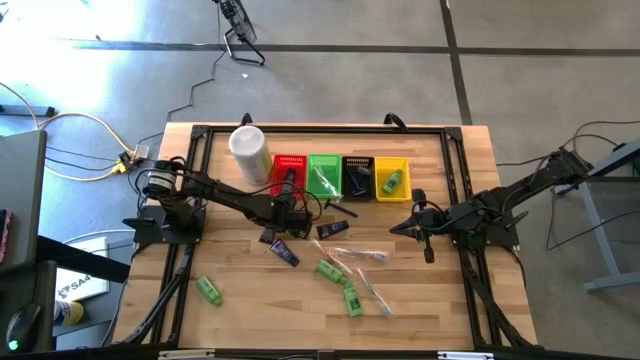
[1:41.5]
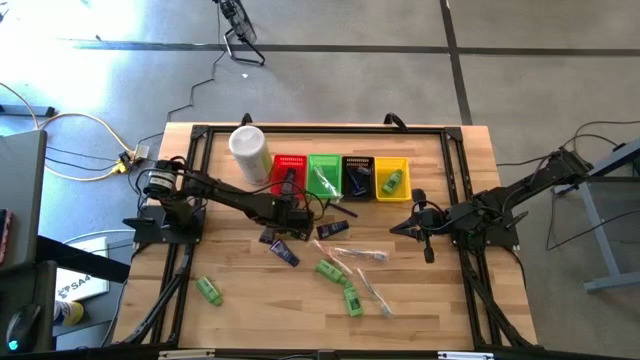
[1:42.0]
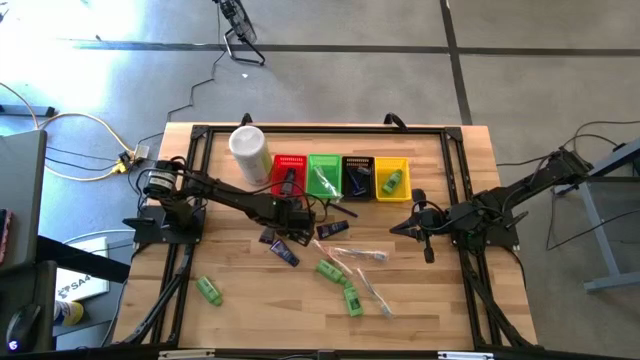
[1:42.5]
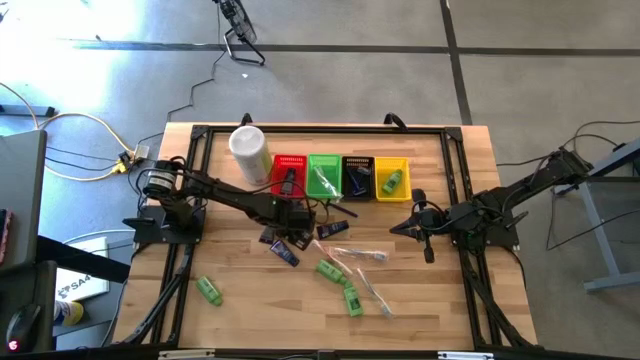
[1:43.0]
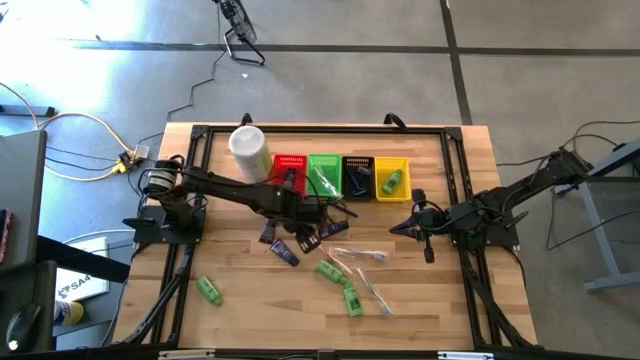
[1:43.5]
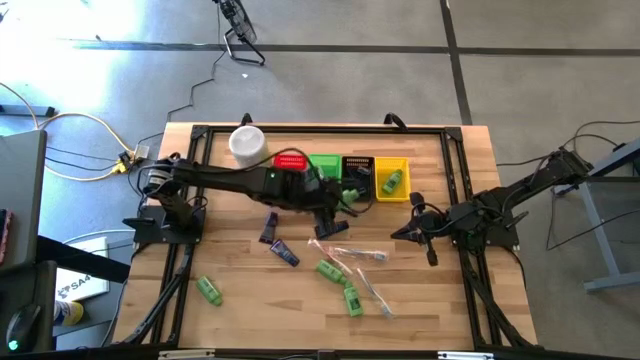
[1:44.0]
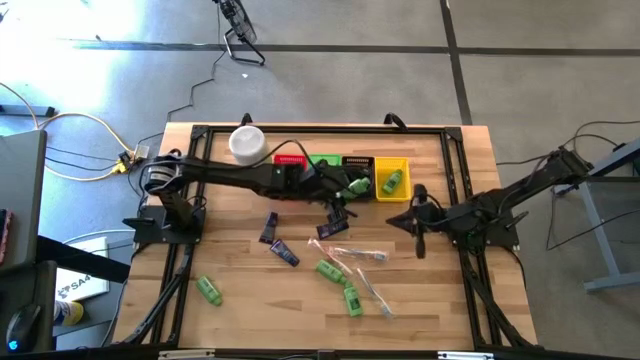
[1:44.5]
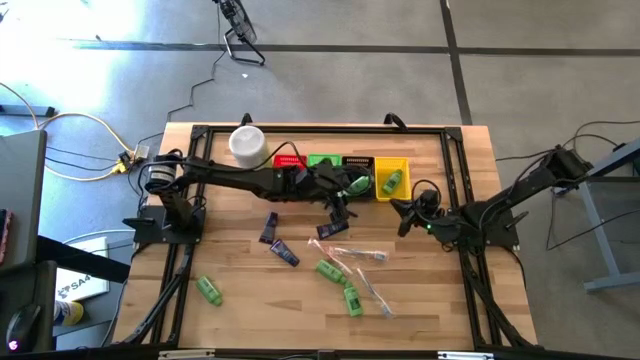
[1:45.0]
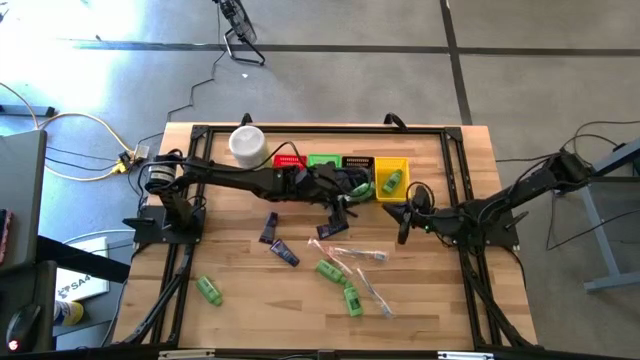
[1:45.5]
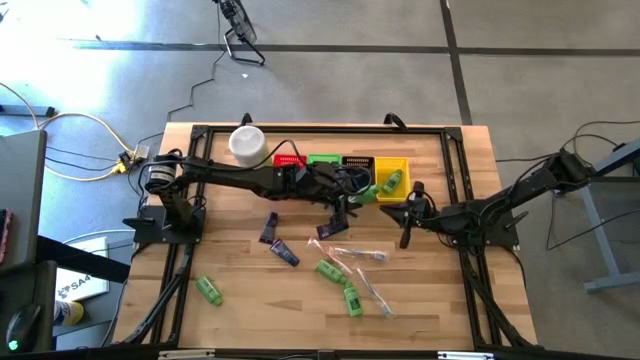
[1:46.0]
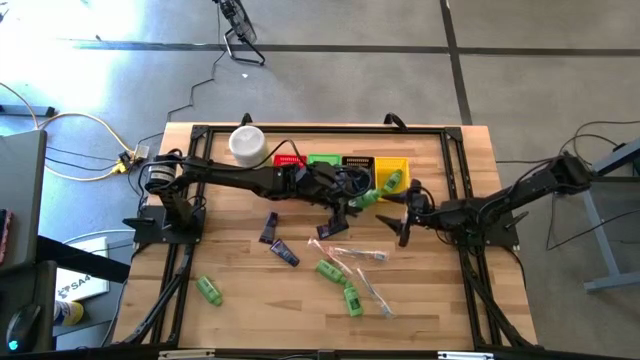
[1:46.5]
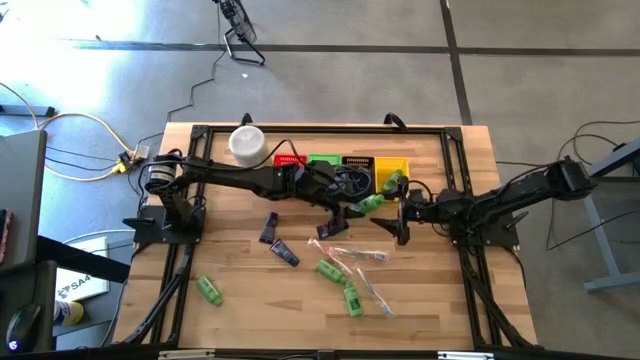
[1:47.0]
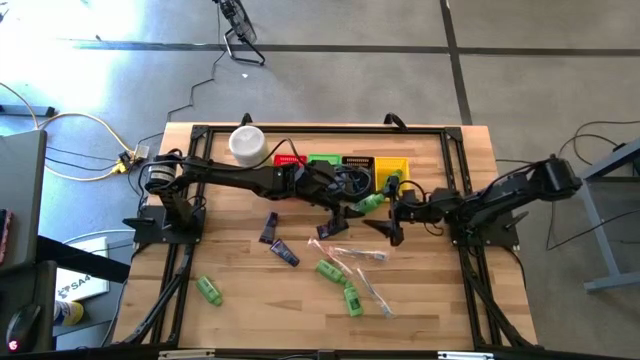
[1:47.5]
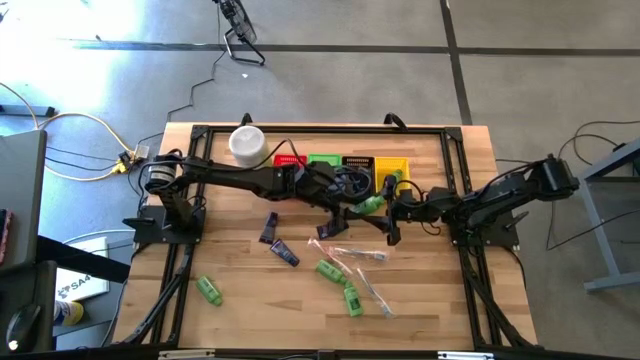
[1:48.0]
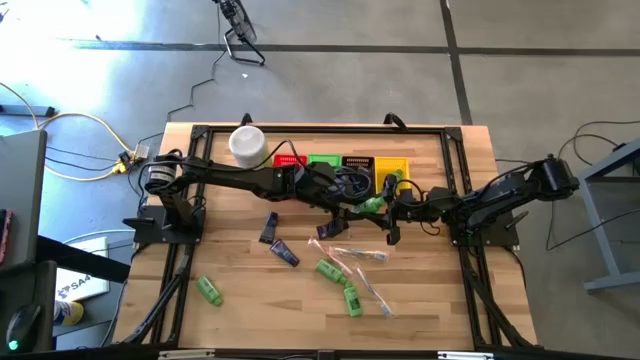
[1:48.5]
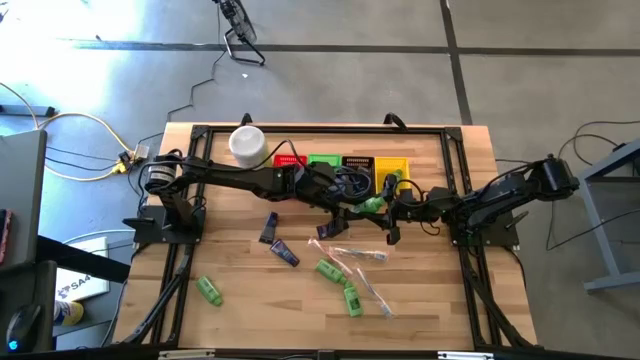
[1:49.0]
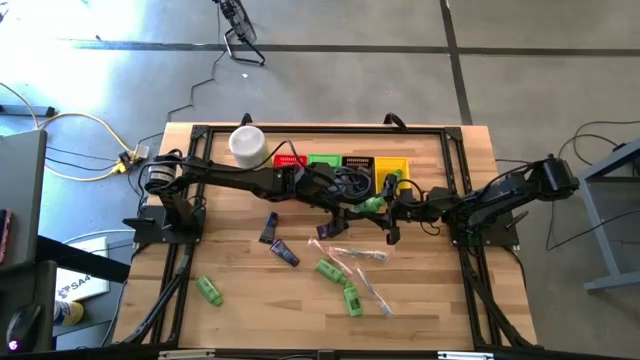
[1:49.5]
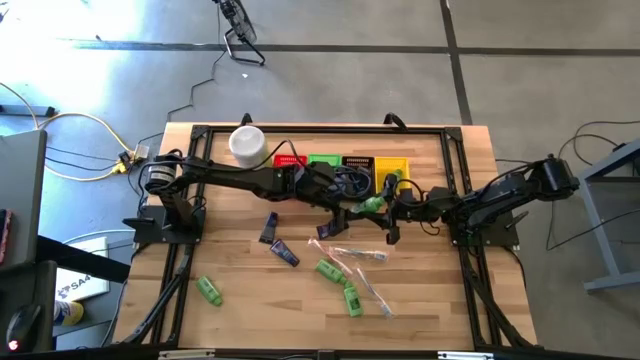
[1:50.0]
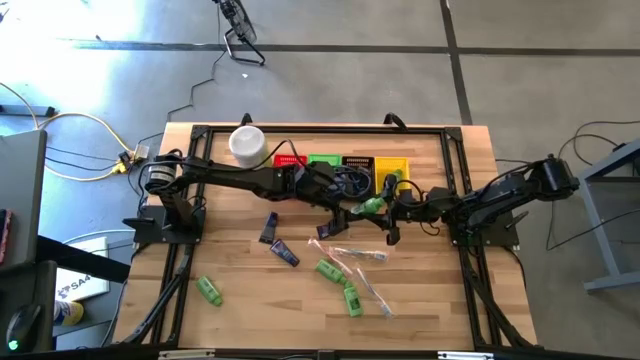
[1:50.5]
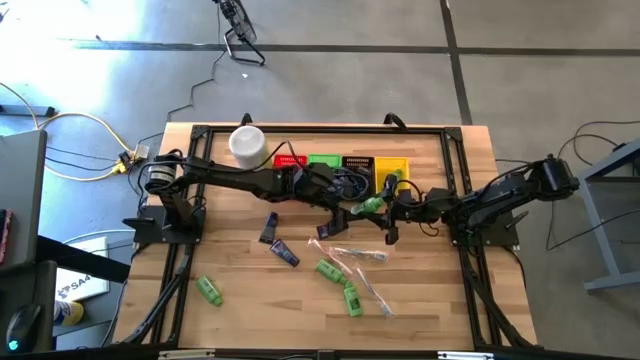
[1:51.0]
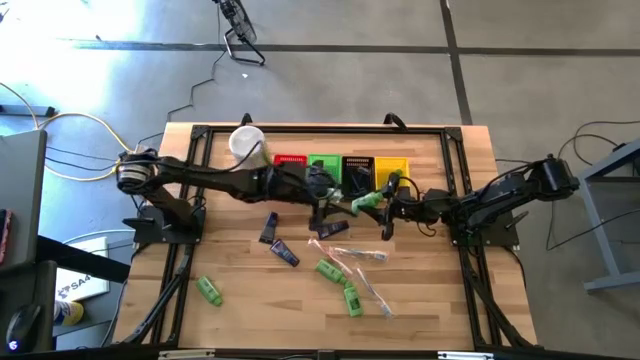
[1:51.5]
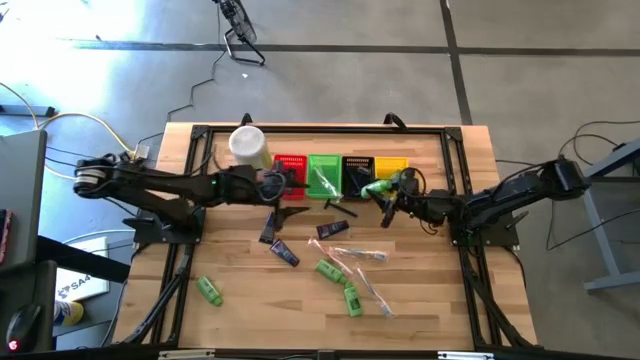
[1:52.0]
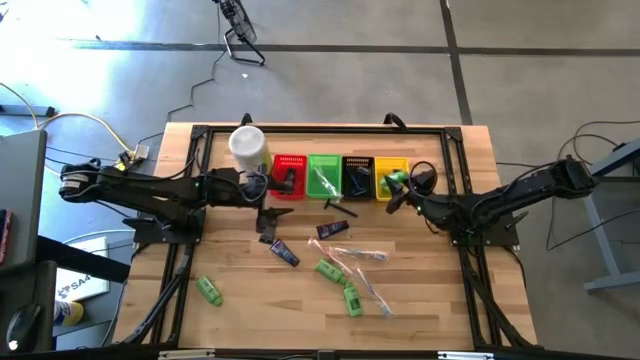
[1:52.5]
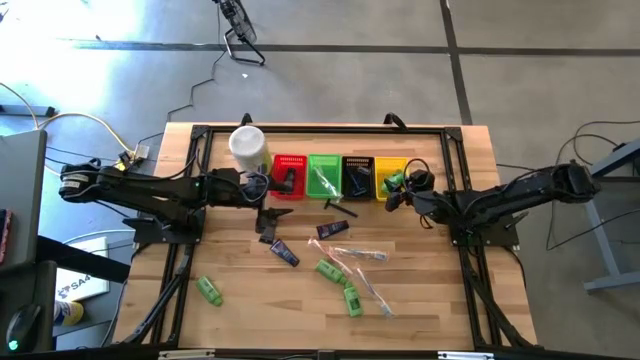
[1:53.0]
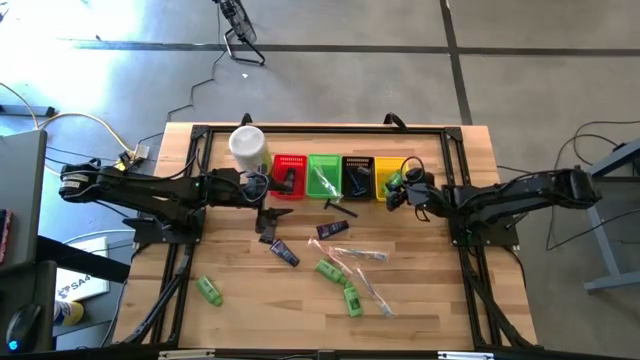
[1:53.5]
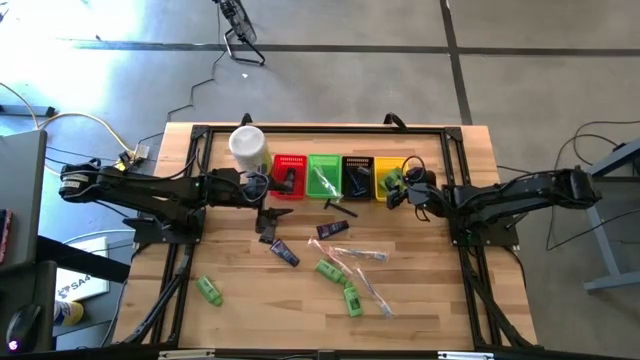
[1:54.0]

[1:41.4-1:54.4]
Task: Pick & Place Travel size toiletries
Put the green shampoo into the yellow bin

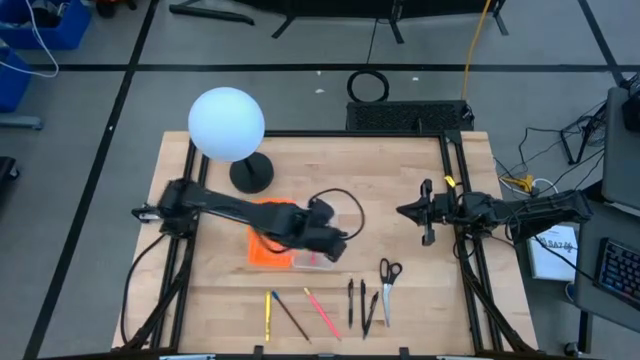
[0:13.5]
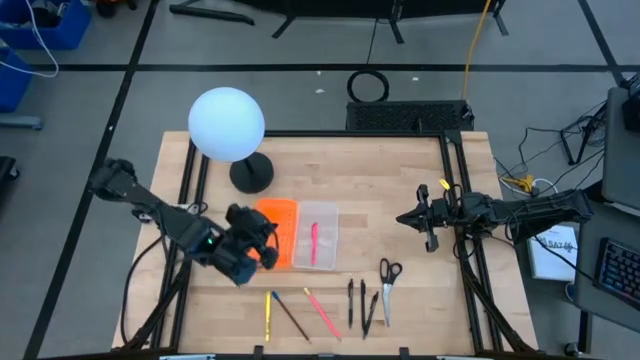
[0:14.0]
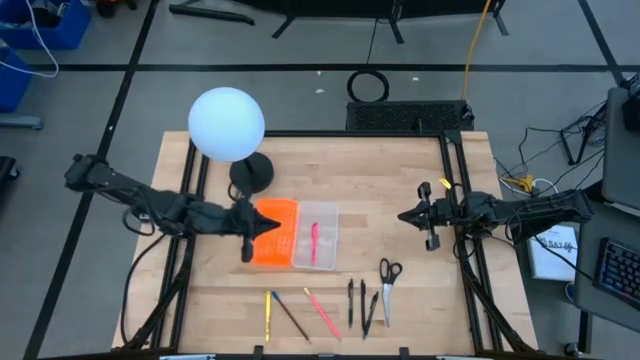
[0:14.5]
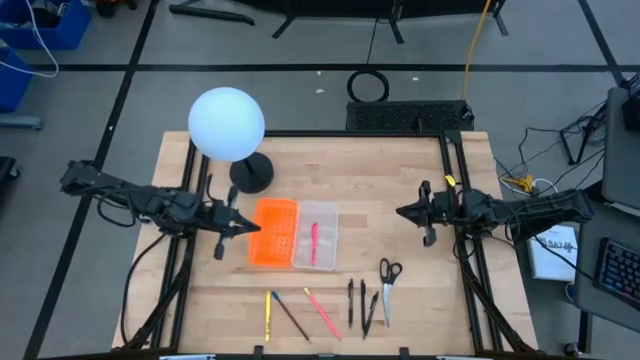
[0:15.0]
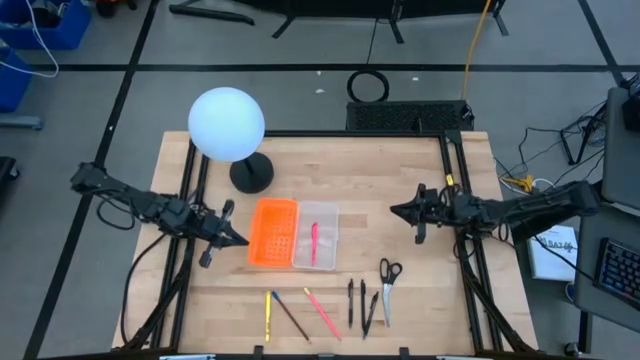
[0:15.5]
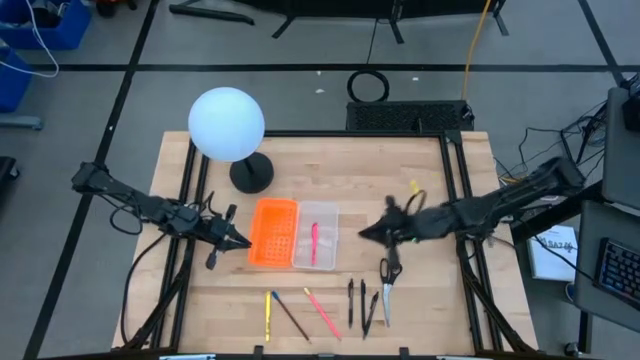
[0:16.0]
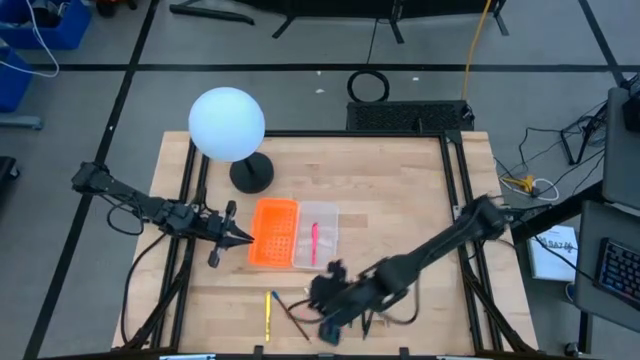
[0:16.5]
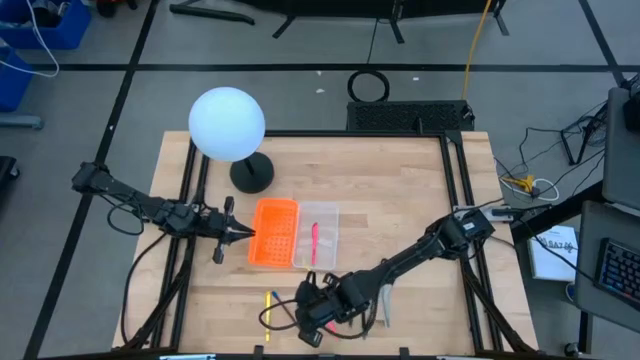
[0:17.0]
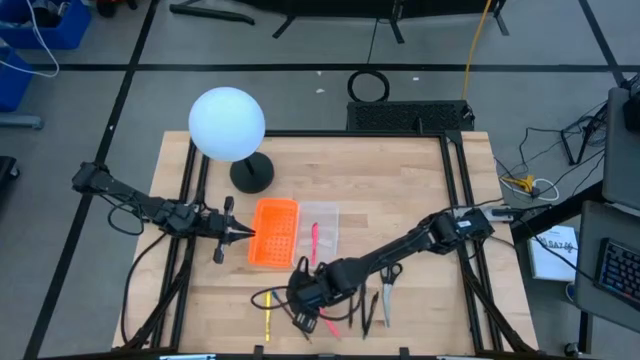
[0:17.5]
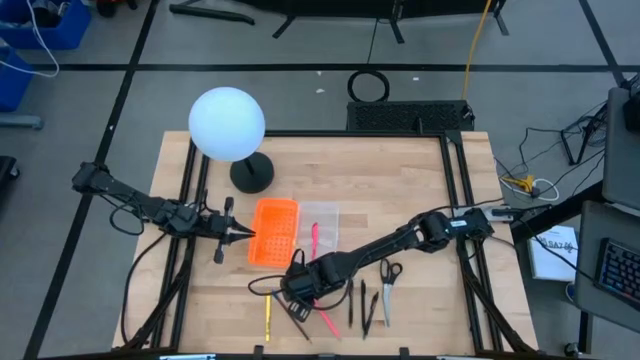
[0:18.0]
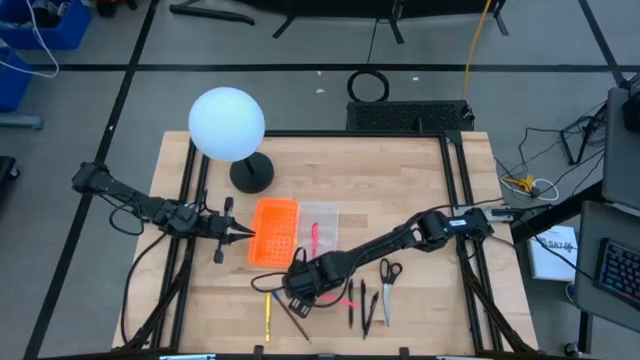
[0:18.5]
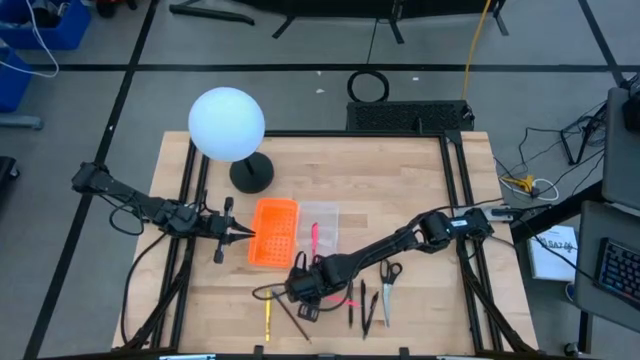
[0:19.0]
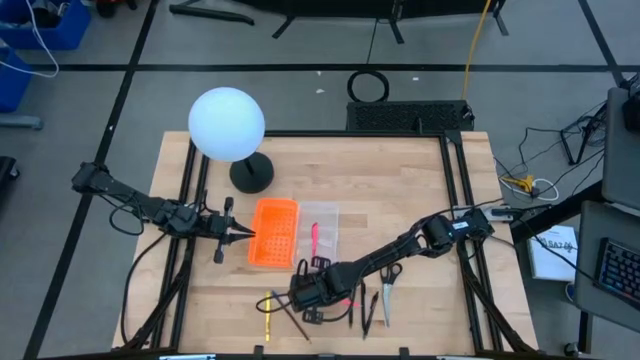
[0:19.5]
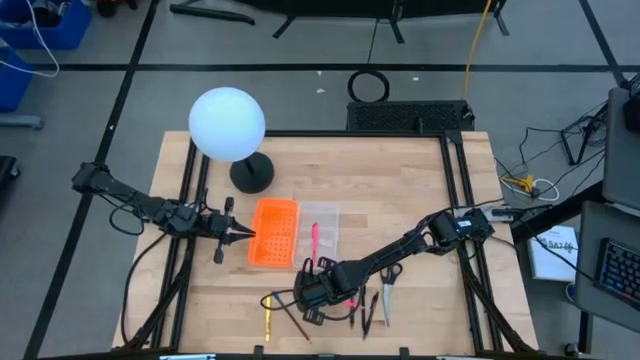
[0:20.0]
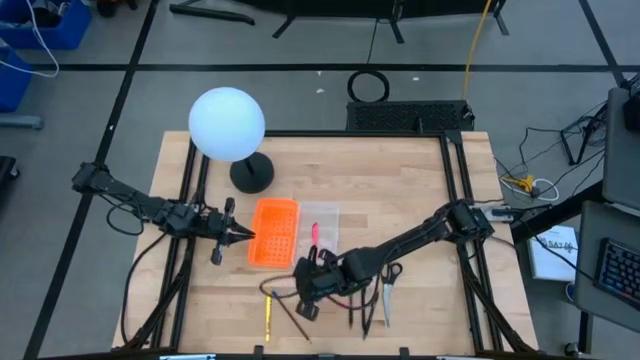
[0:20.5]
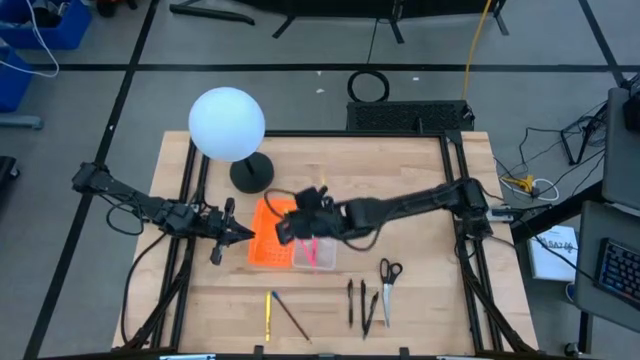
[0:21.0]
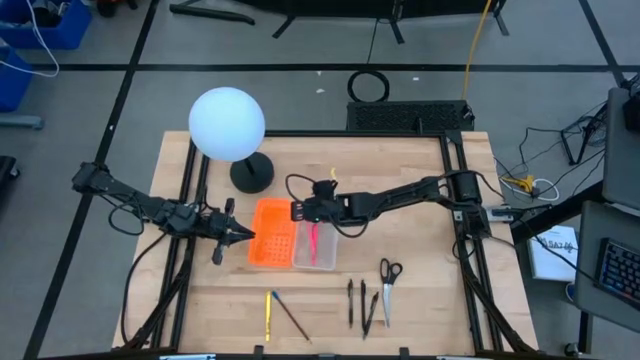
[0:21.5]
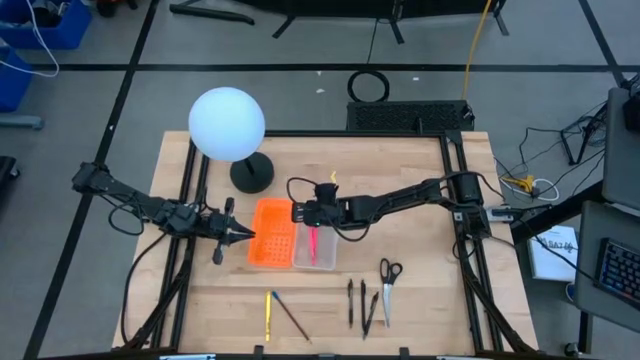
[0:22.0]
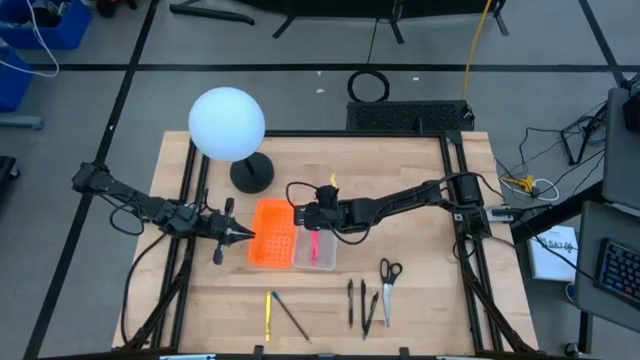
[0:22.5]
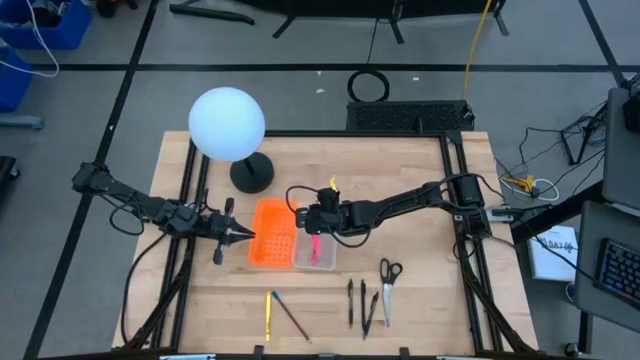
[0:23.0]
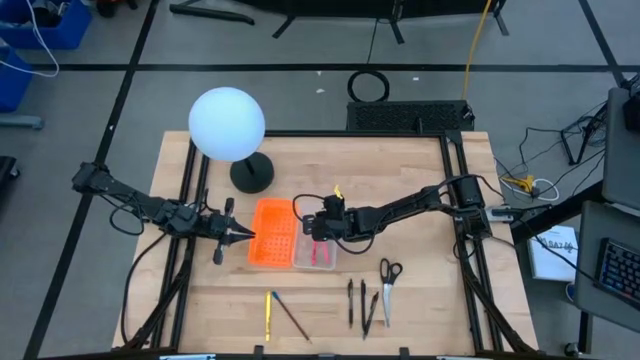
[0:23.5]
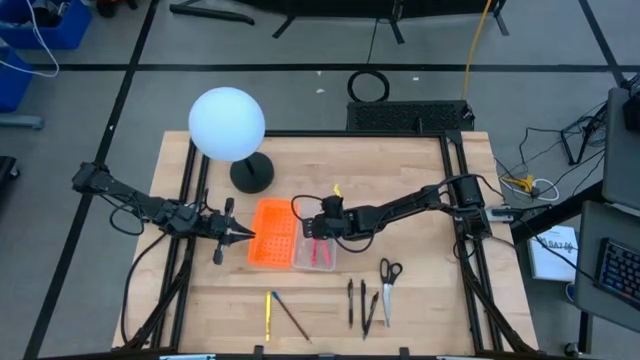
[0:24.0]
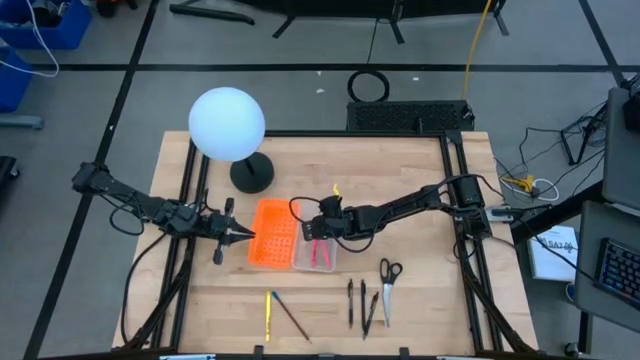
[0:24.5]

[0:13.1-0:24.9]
Task: Pick & place school supplies into a supply box
Put the pink pen into the supply box
